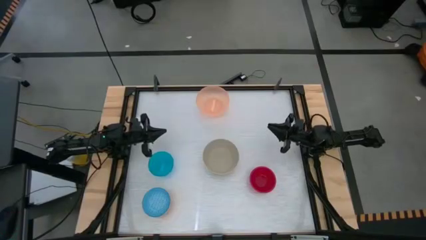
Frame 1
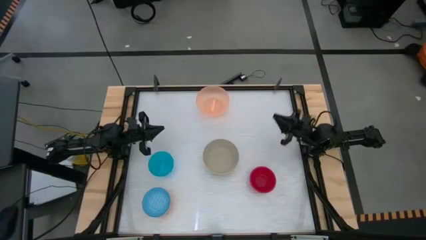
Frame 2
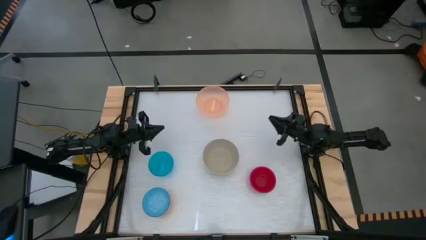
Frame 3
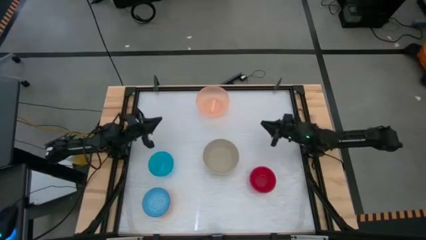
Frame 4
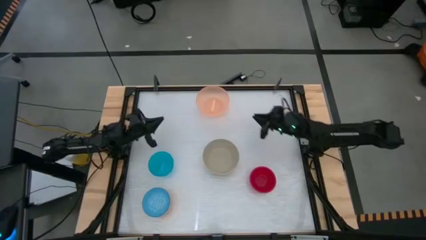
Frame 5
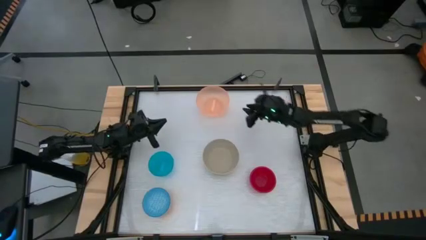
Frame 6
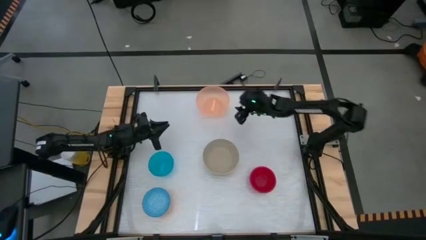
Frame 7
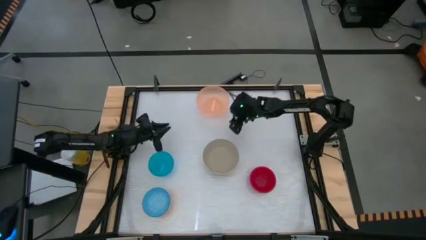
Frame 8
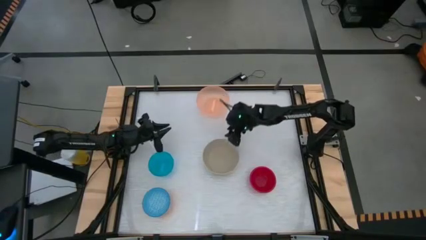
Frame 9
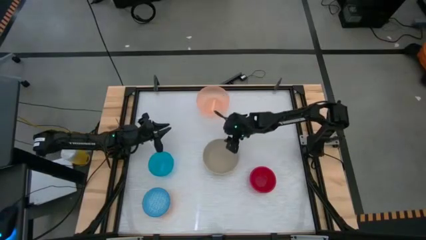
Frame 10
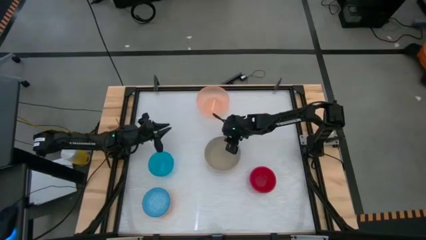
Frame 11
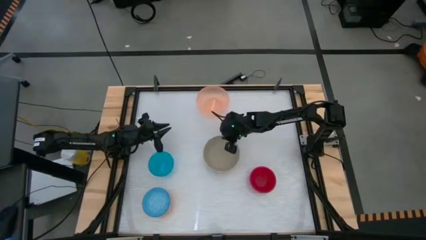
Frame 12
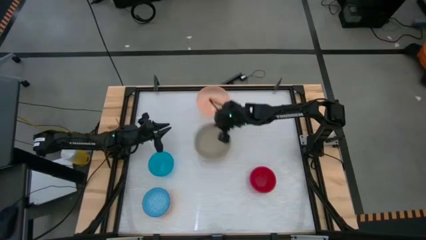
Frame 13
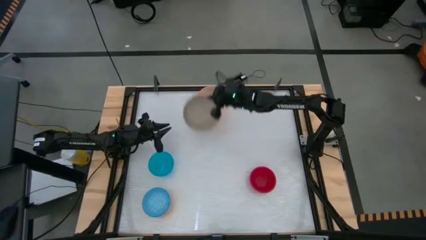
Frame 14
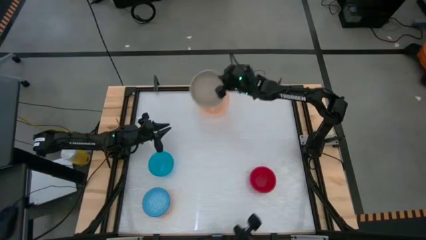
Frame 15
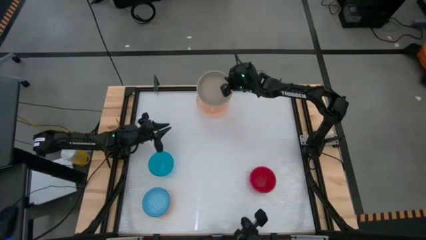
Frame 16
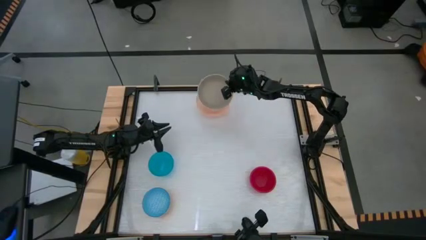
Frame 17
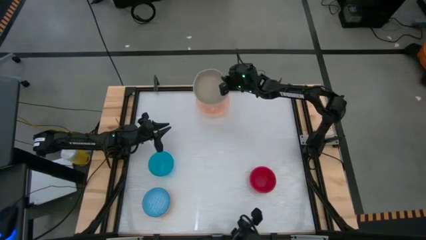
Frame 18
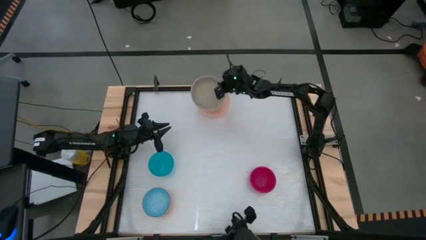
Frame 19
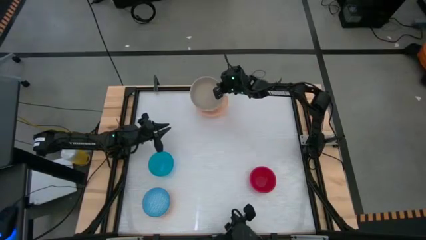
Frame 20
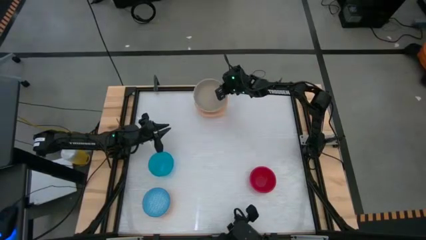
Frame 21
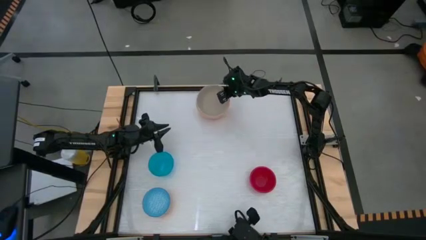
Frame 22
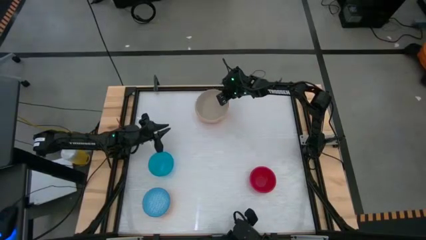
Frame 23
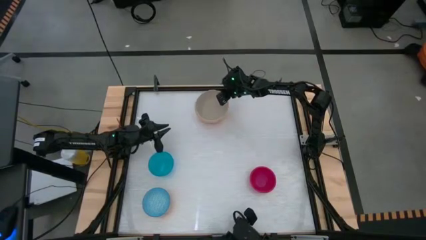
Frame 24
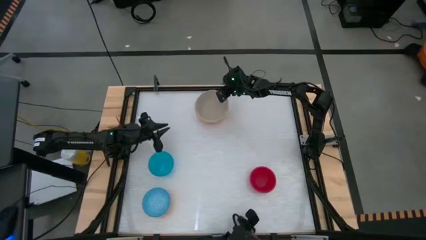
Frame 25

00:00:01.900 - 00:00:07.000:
Put the white bowl on top of the orange bowl

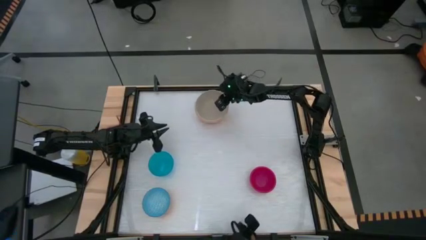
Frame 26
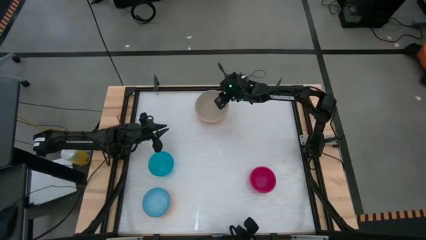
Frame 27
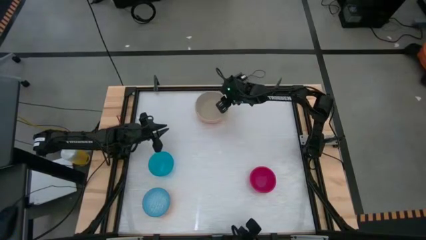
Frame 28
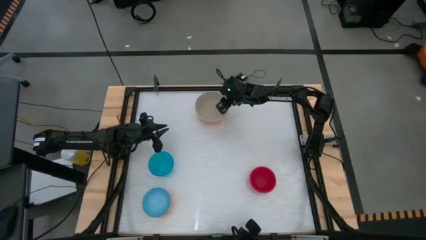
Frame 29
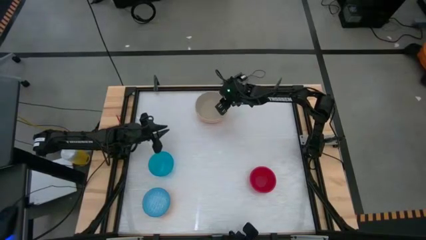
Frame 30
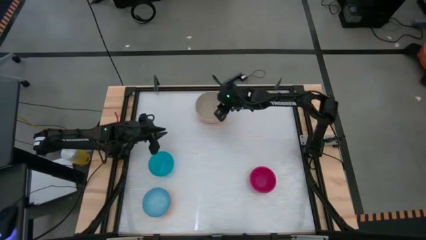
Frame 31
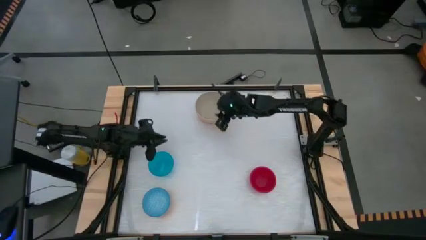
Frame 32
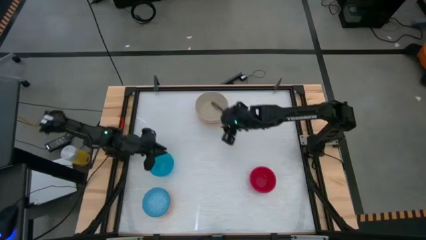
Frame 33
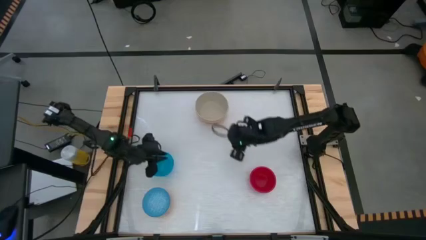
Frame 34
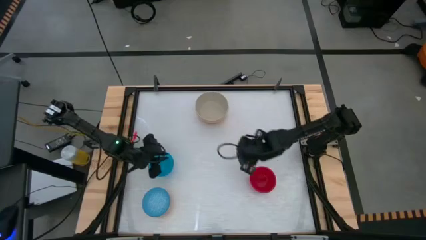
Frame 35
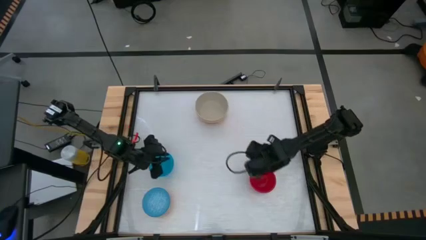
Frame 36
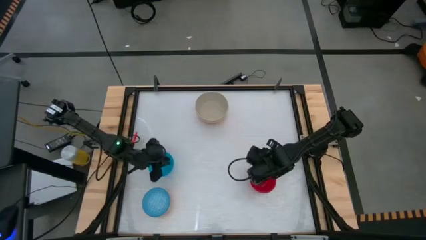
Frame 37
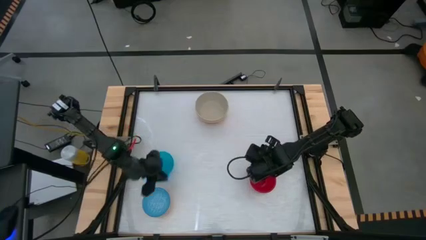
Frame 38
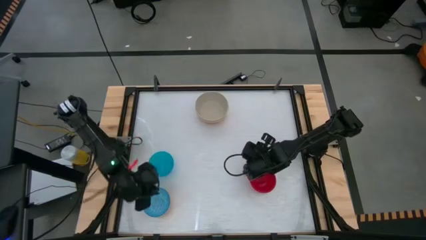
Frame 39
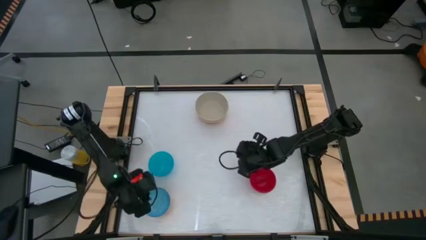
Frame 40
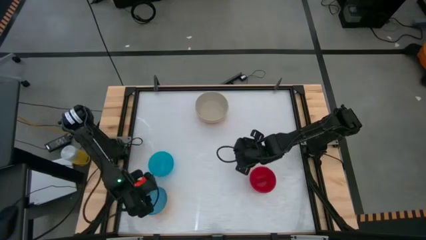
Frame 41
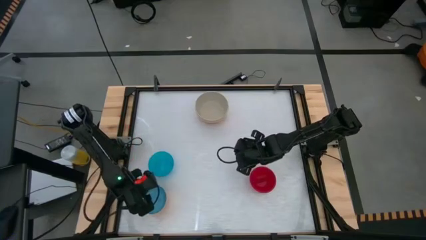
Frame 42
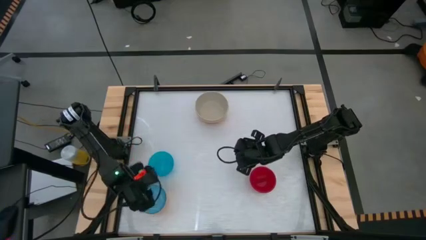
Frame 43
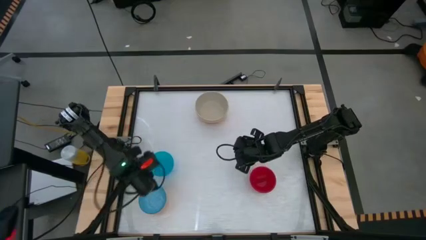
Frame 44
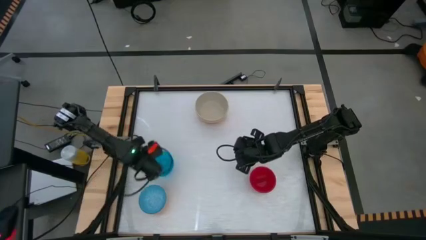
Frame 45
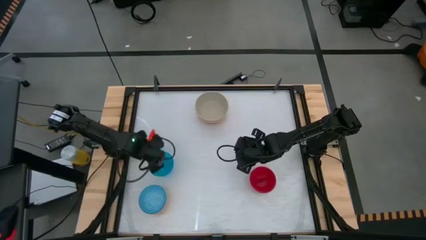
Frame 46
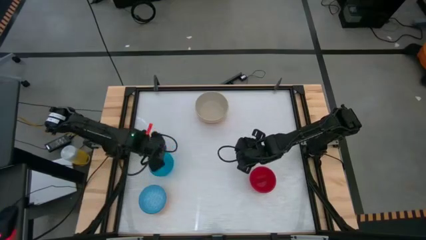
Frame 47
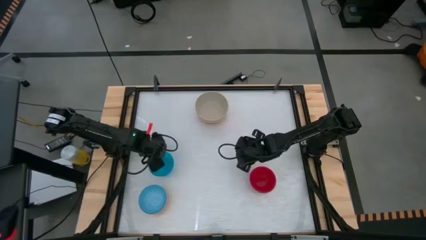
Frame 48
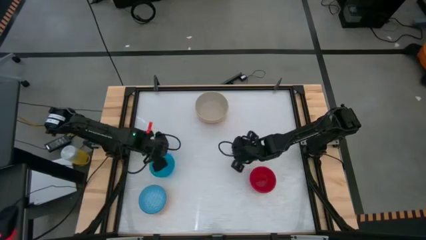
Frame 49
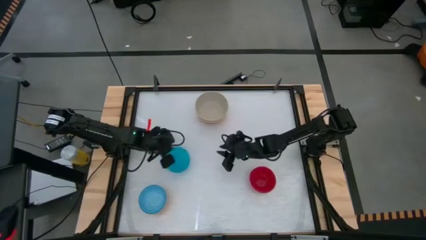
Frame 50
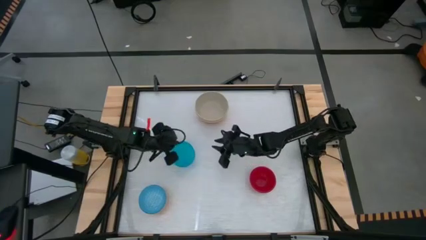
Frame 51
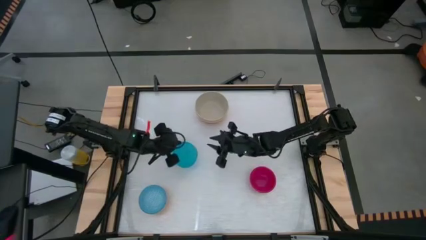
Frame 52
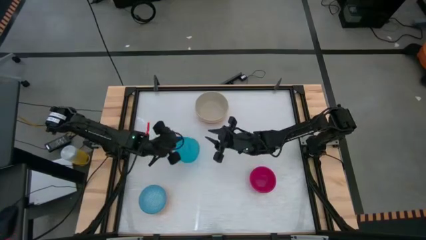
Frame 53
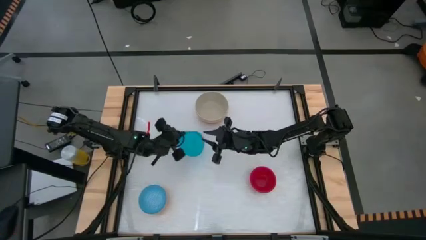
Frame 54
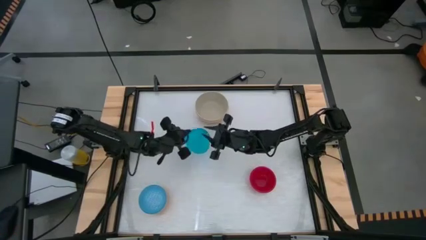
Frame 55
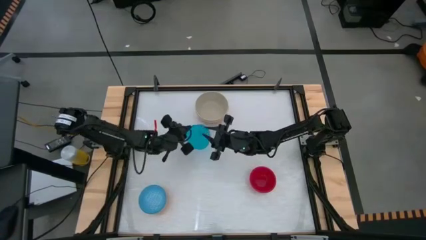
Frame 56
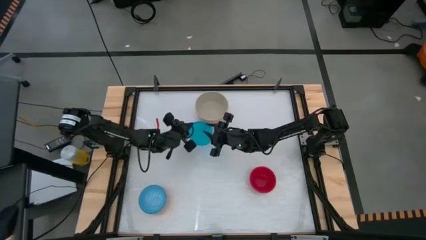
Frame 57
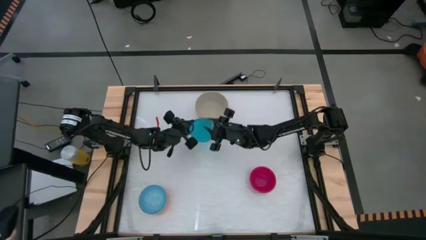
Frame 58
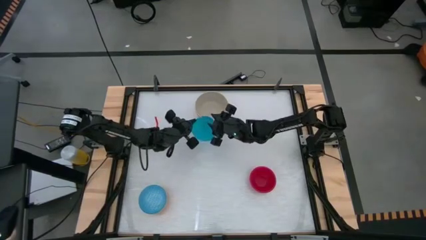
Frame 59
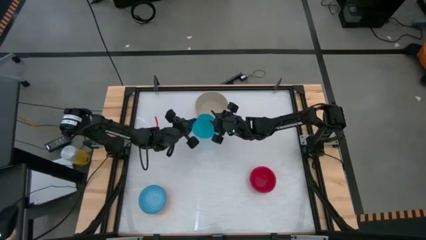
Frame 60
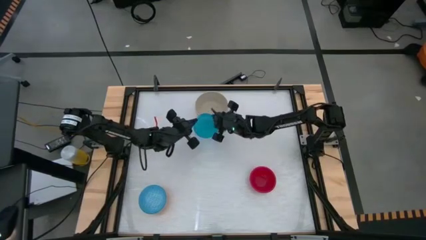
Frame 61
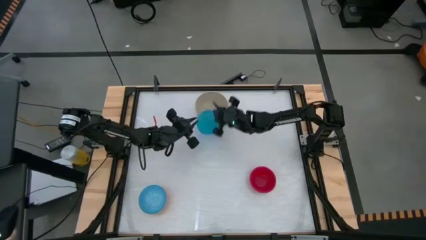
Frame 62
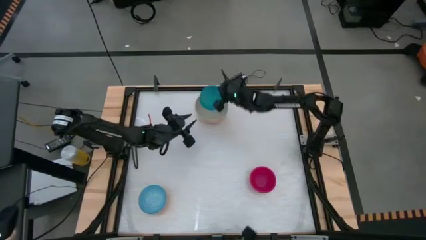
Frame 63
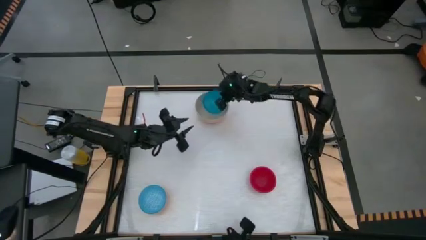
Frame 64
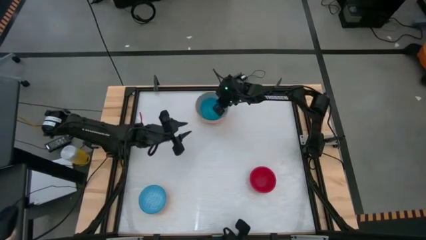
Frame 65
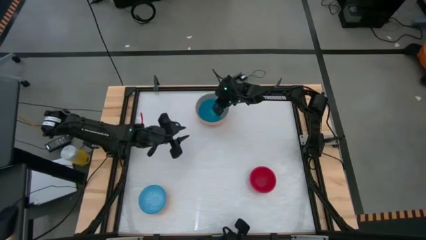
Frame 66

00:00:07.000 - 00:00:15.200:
Stack the transparent blue bowl on top of the white bowl

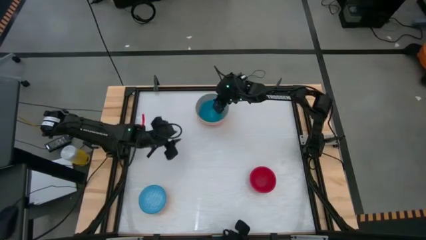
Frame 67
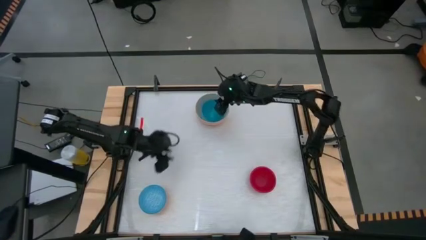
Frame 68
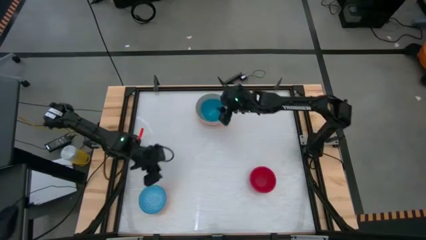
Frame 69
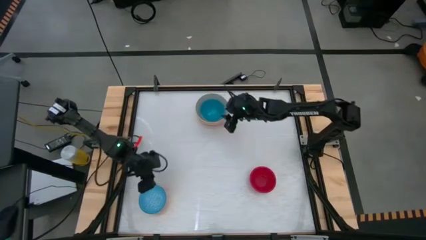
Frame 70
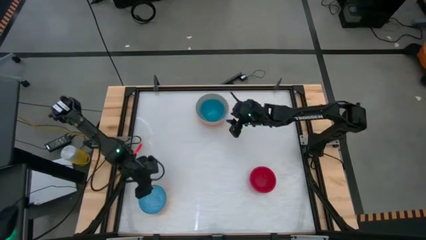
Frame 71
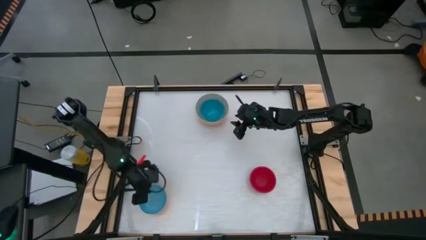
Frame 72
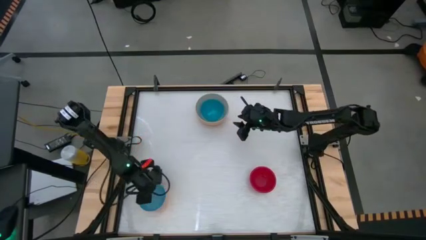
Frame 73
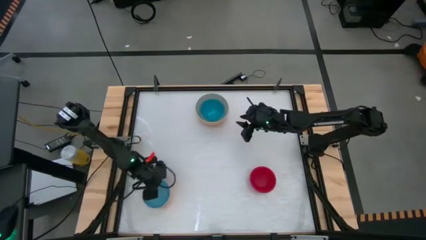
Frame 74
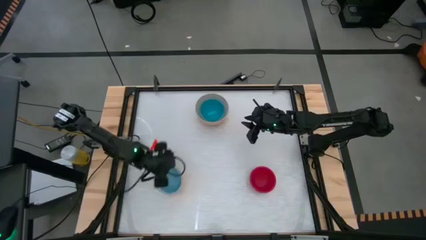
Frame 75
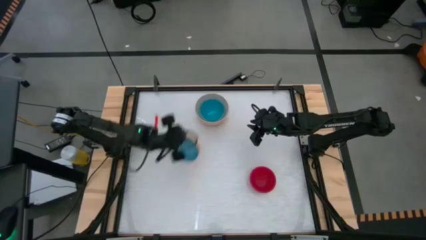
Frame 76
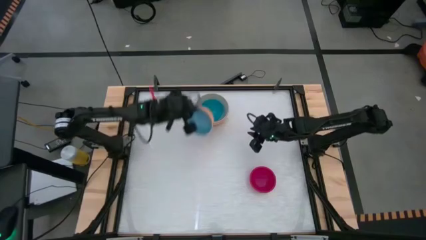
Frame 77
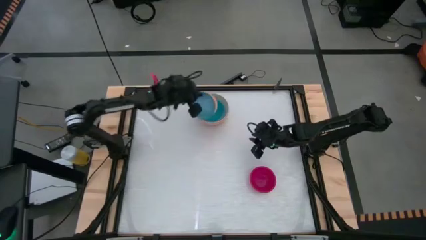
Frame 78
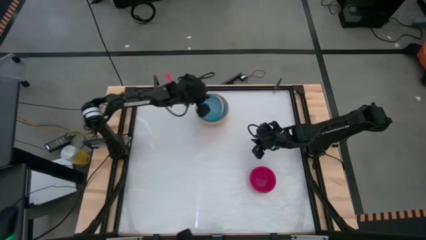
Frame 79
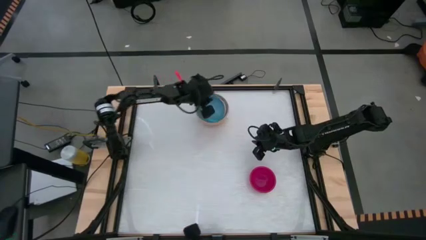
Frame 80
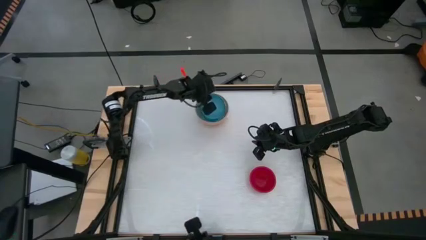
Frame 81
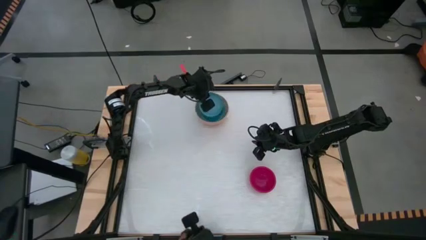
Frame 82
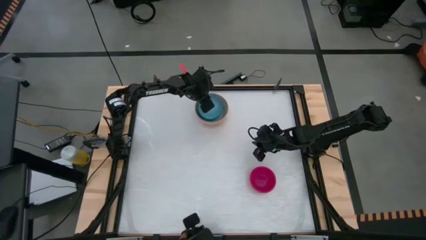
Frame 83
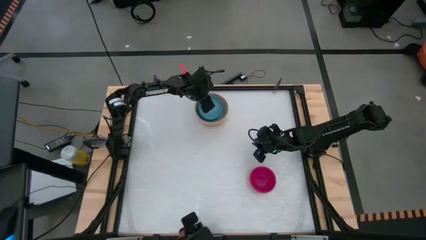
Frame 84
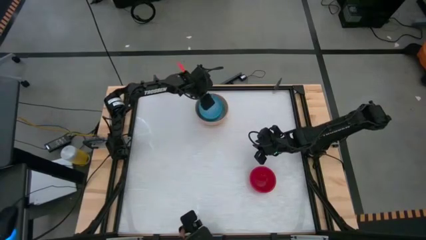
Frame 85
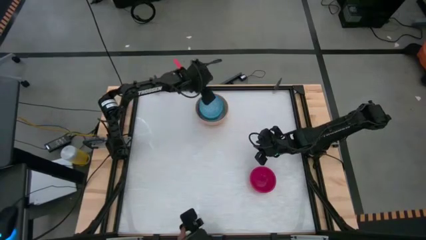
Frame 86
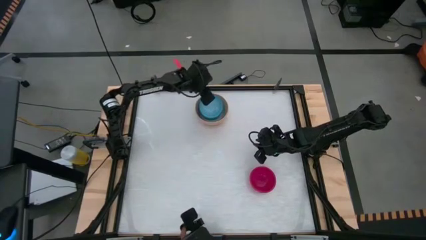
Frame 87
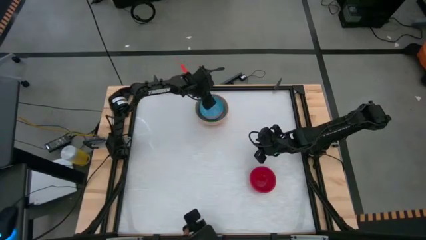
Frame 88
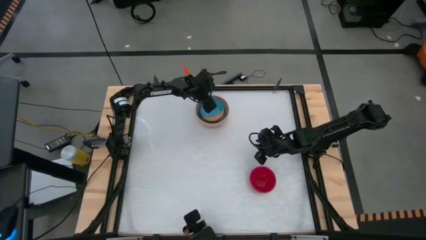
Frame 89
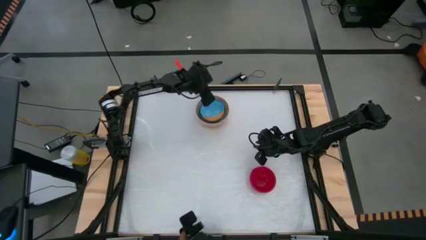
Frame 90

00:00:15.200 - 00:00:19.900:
Stack the printed blue bowl on top of the transparent blue bowl
